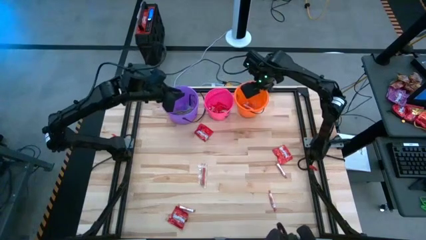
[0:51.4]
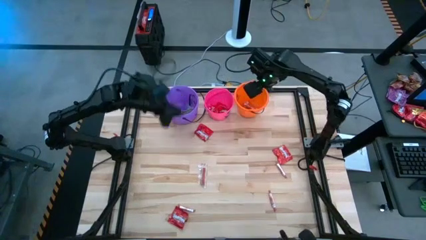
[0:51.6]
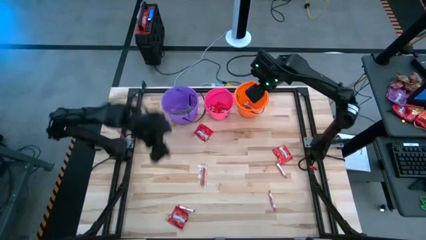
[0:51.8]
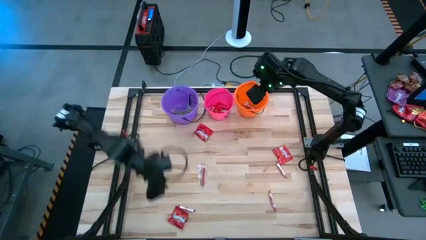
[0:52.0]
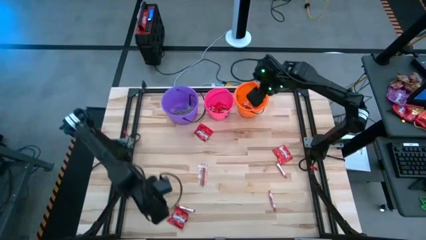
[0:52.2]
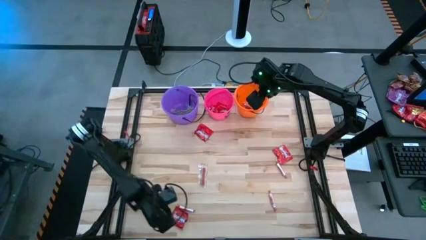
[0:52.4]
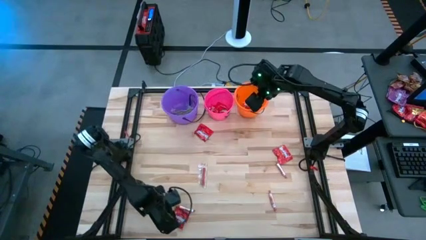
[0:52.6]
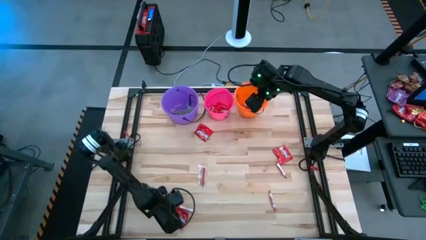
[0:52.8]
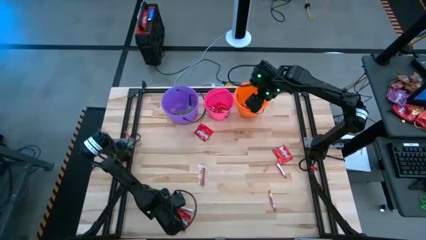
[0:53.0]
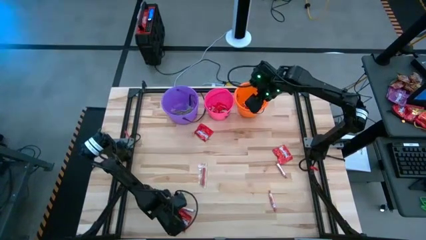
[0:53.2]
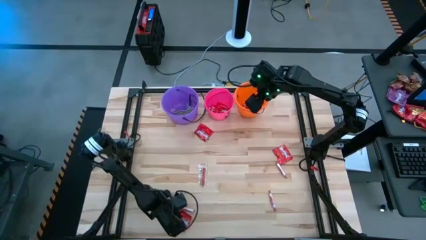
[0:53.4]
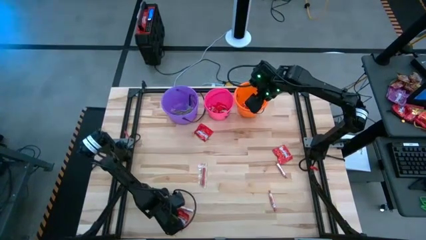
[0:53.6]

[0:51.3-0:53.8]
Task: Sort candy by brand, put in halloween buckets
Put the red candy pack into the pink bucket

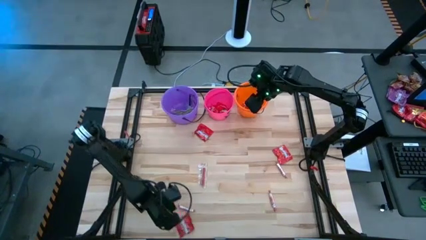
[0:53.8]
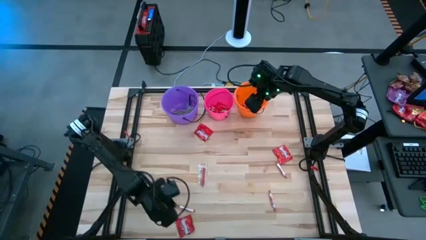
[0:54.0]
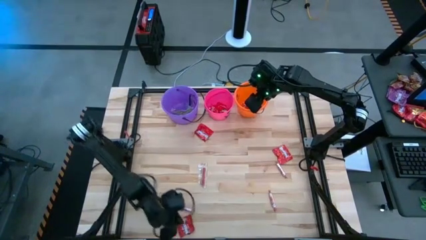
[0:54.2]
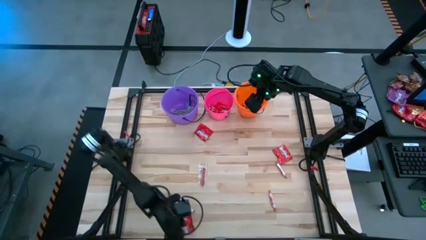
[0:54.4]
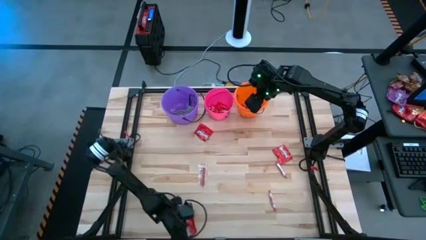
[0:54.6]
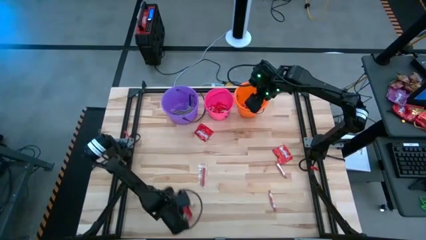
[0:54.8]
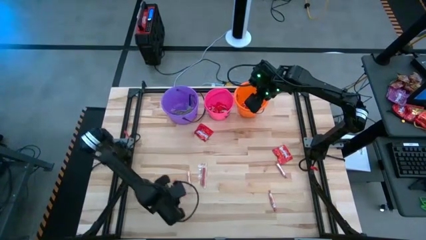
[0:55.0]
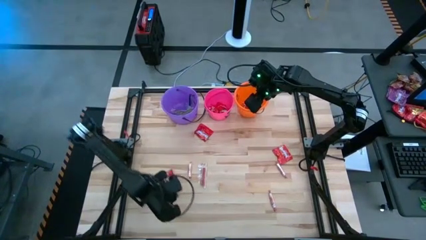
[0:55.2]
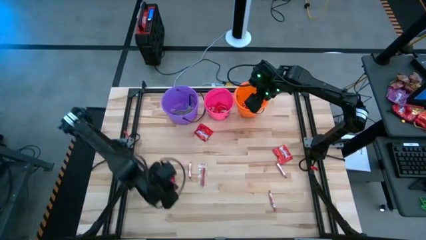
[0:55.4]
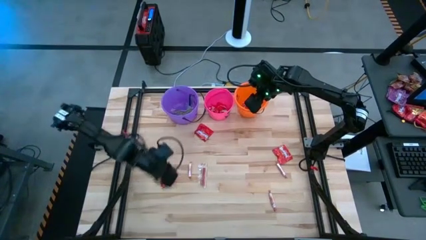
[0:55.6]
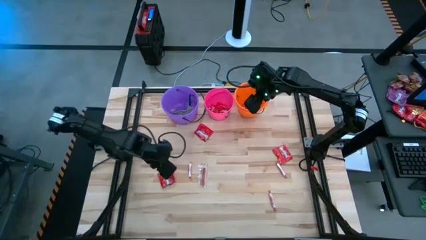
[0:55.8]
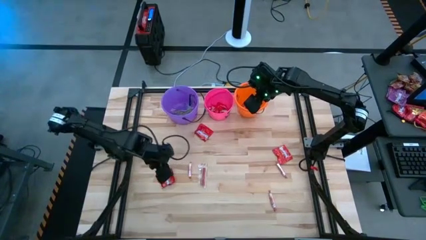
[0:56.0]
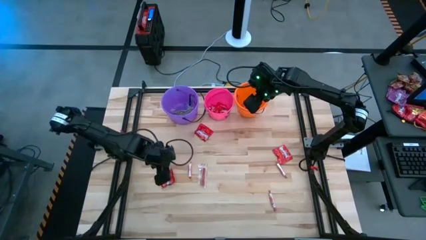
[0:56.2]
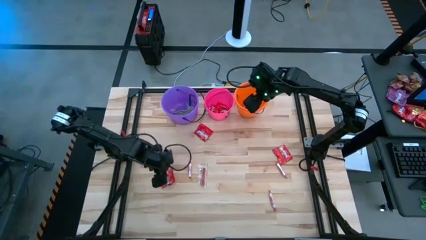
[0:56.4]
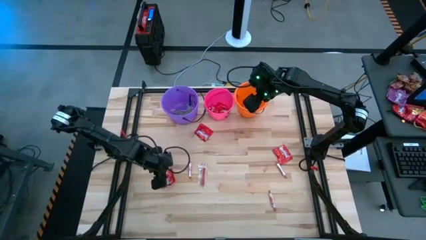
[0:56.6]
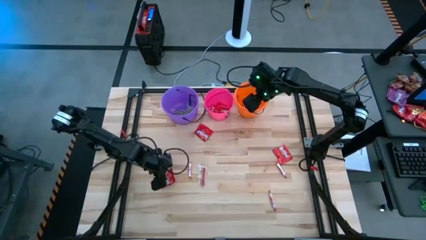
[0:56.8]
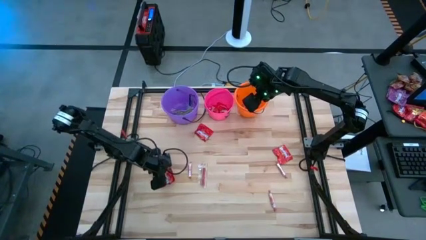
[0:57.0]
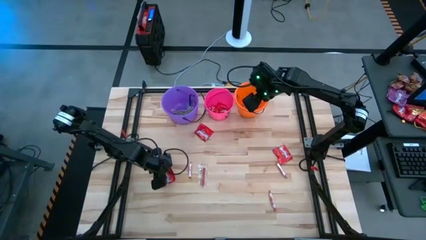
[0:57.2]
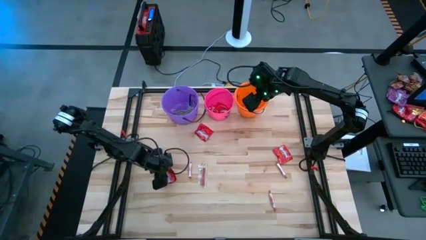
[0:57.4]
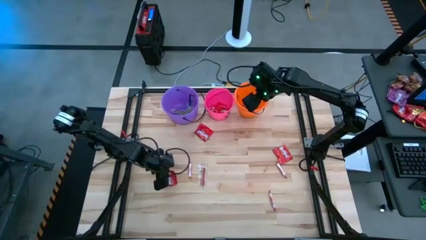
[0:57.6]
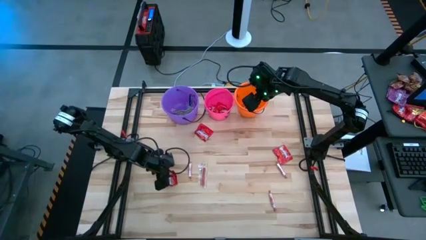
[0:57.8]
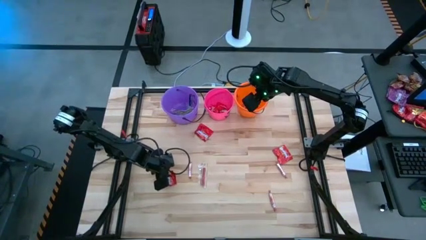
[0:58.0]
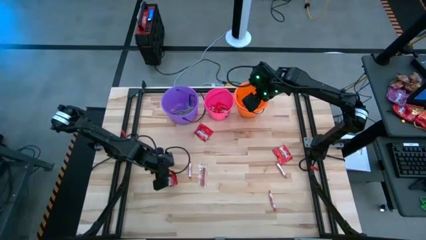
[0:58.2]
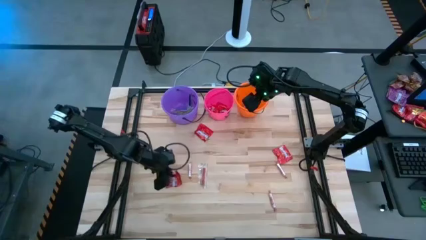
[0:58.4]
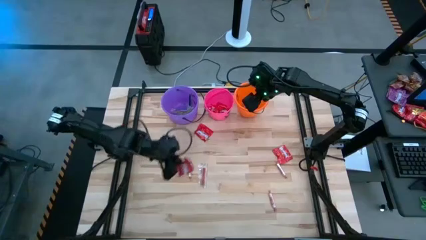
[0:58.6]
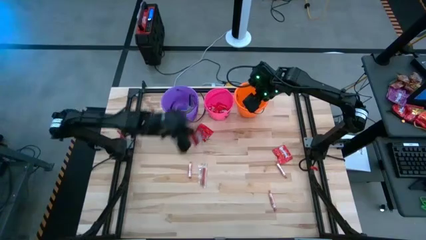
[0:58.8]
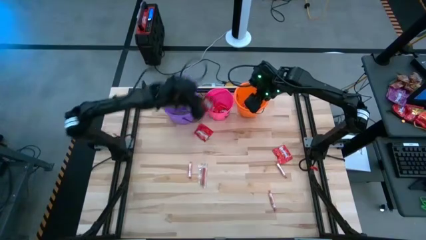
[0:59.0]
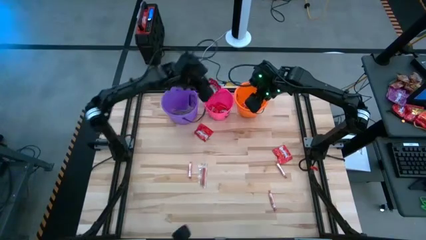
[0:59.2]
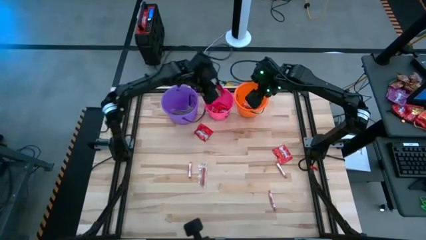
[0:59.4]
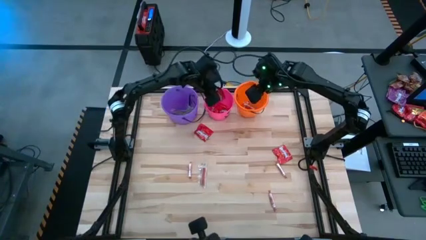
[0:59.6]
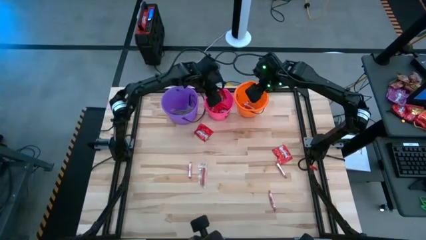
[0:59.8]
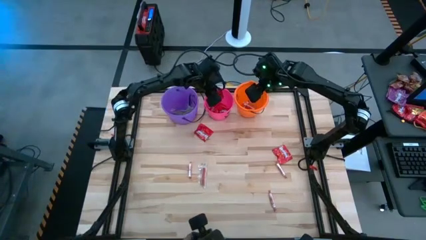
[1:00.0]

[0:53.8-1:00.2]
Put the red candy pack into the pink bucket

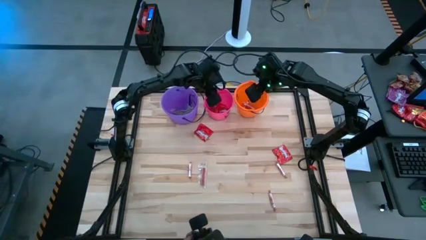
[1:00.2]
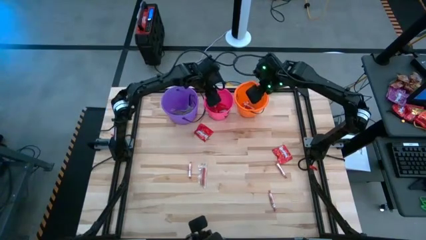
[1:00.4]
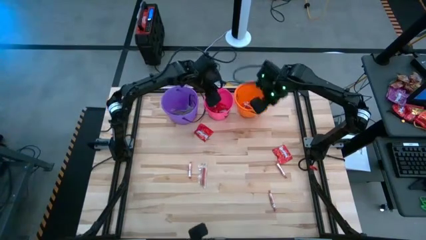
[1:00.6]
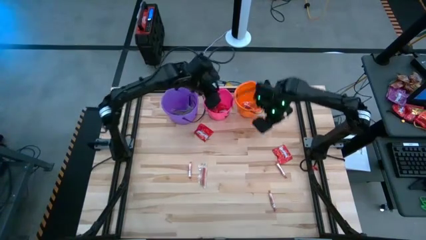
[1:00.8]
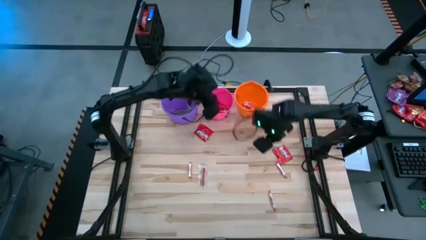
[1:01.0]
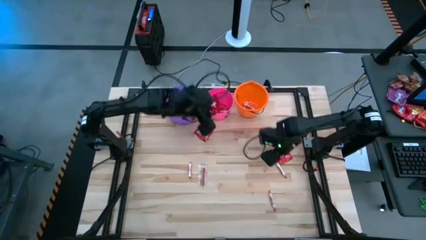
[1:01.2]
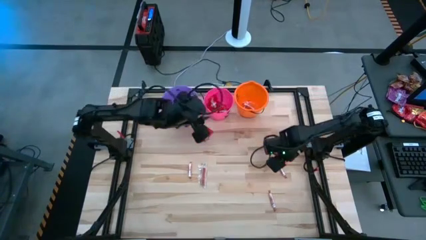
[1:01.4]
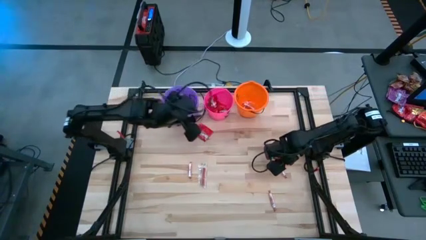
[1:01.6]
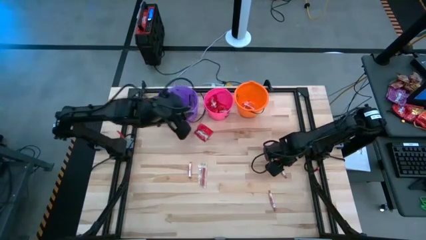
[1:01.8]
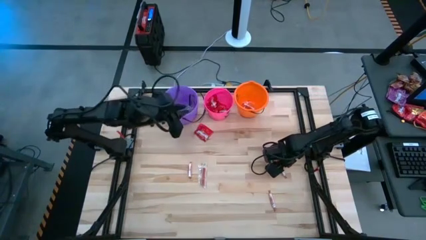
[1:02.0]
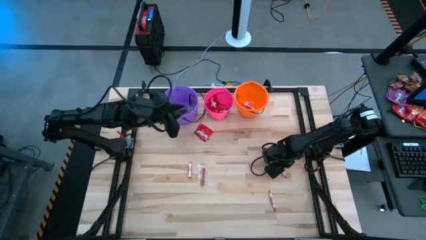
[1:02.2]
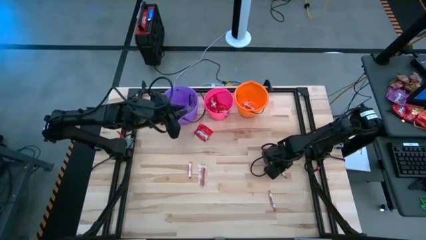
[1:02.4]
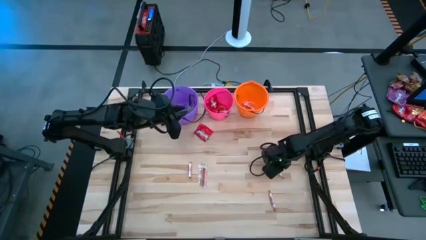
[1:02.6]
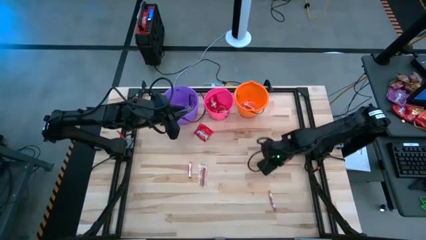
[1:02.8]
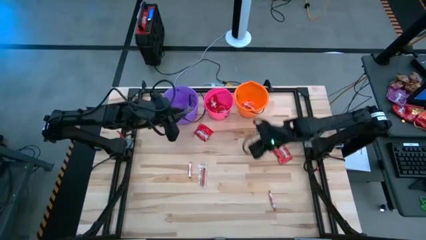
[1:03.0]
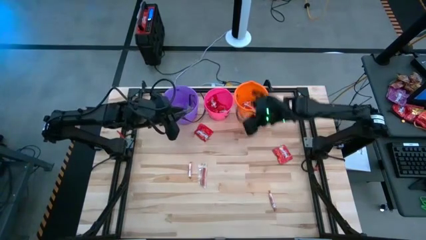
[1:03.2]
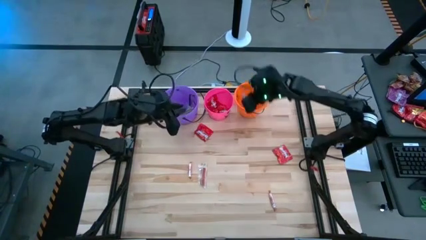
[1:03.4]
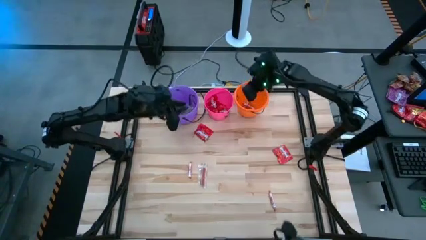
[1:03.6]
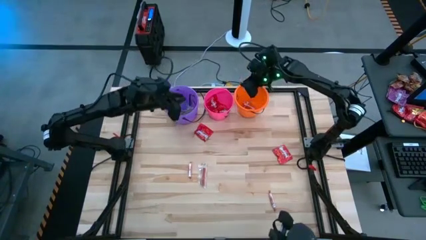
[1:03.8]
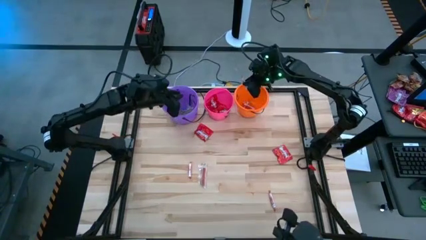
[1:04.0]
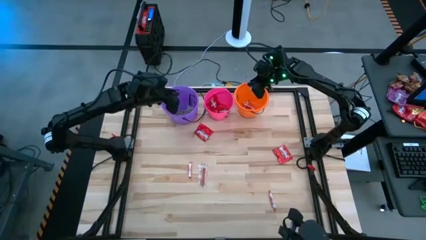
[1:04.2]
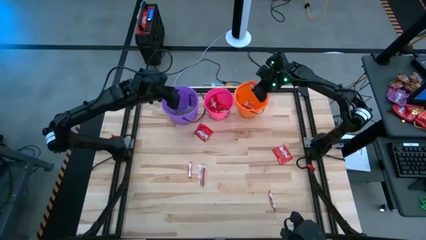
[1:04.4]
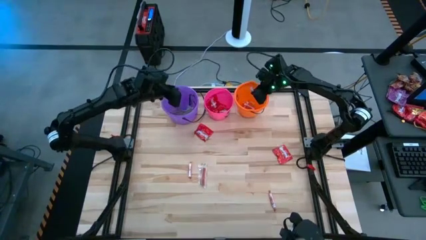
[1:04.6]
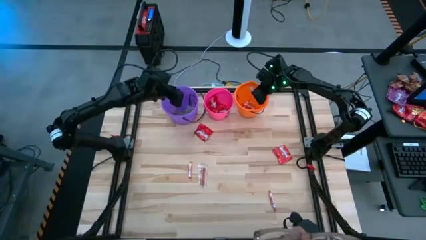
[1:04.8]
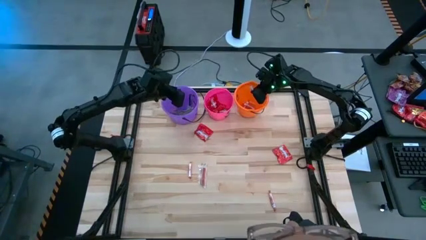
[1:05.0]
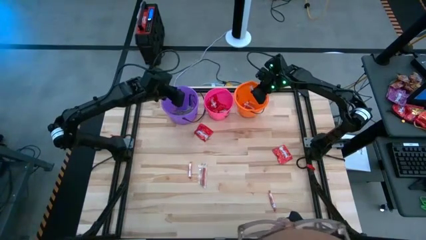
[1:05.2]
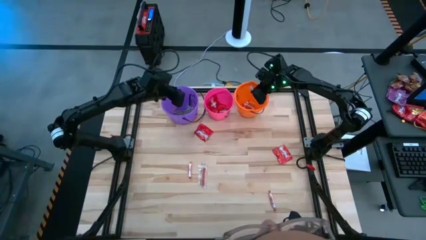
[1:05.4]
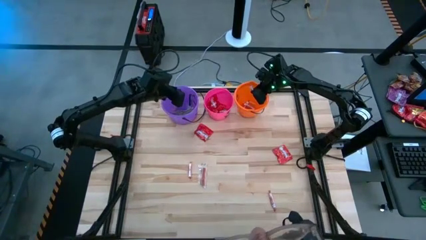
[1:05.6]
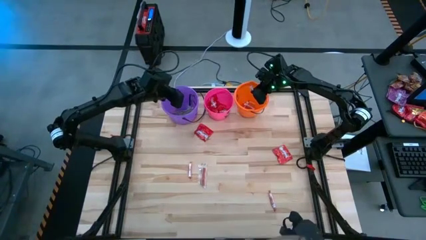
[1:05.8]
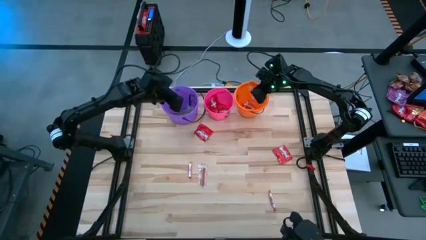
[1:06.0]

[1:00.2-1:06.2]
Put the transparent candy roll into the orange bucket
